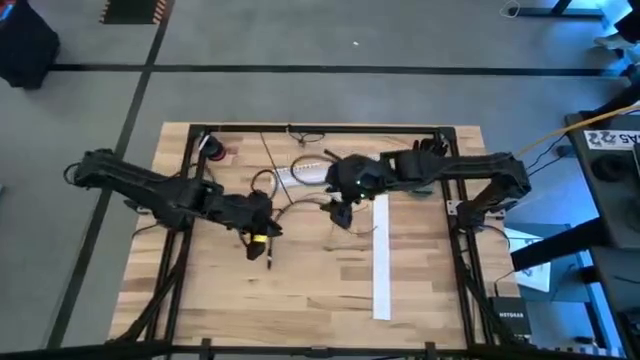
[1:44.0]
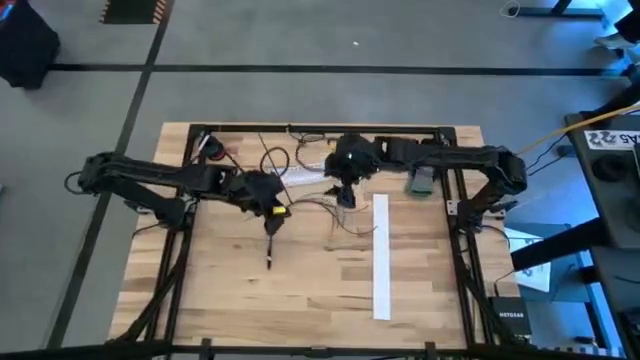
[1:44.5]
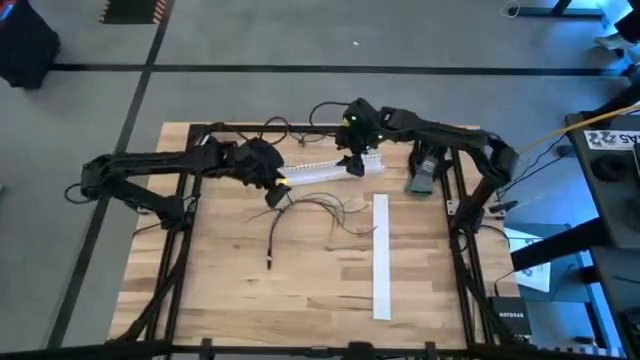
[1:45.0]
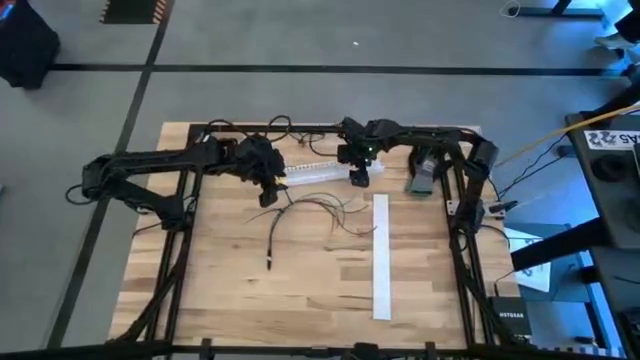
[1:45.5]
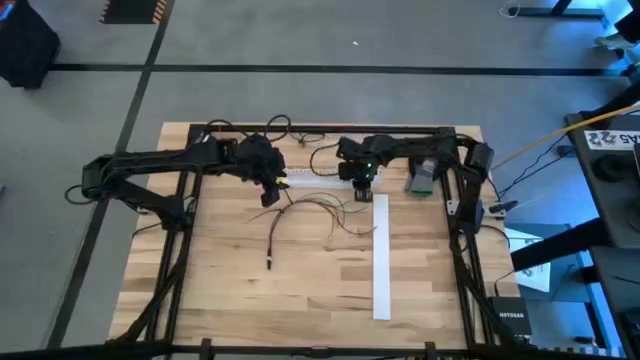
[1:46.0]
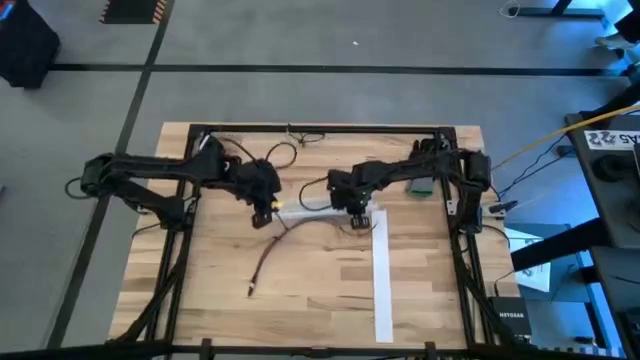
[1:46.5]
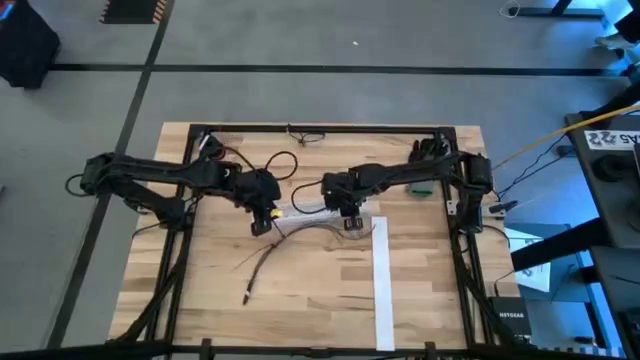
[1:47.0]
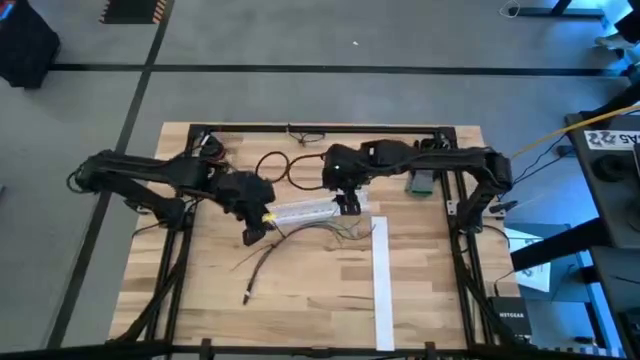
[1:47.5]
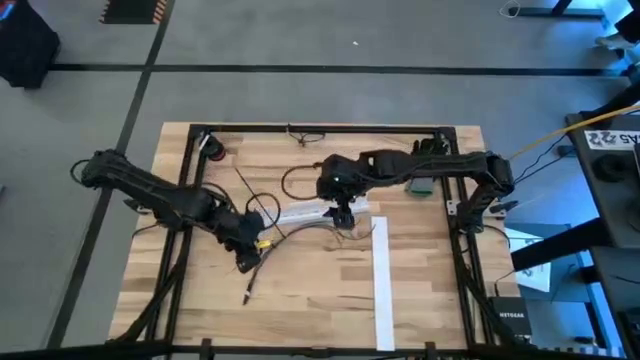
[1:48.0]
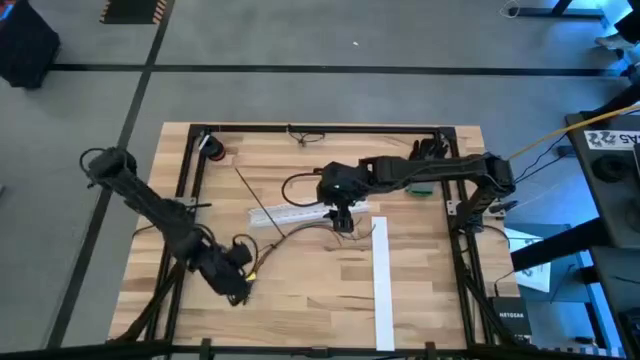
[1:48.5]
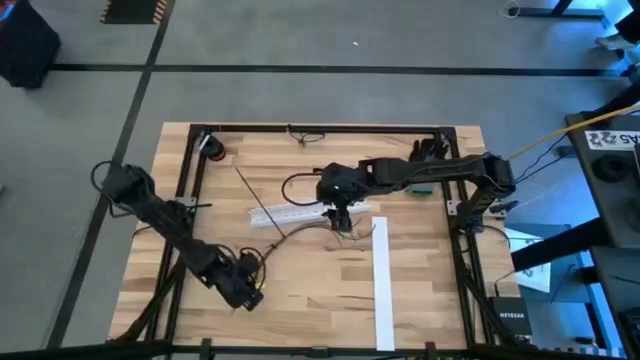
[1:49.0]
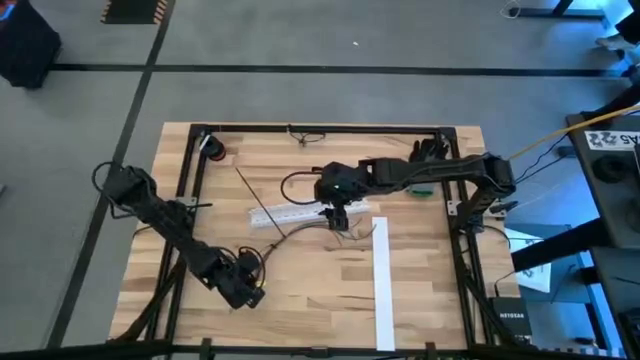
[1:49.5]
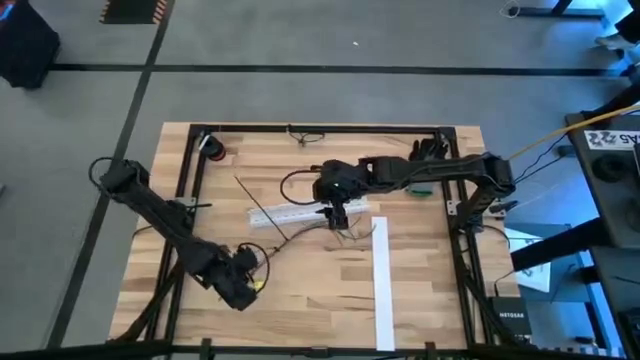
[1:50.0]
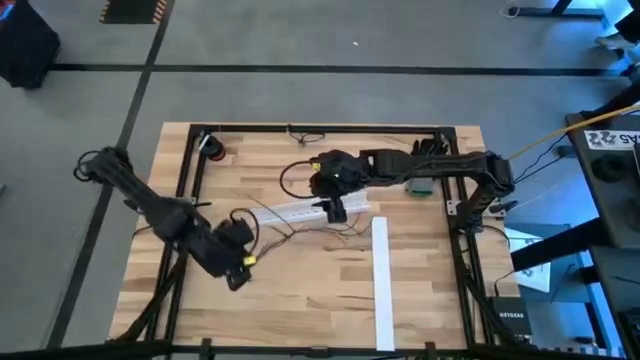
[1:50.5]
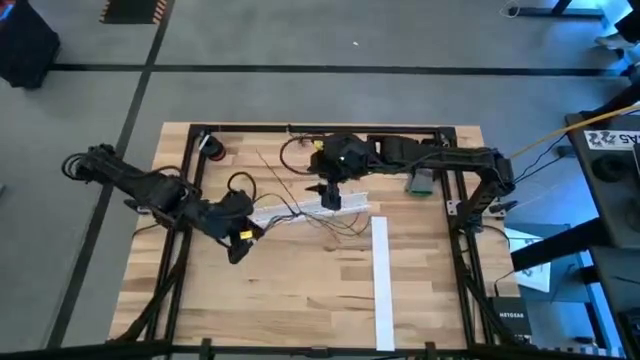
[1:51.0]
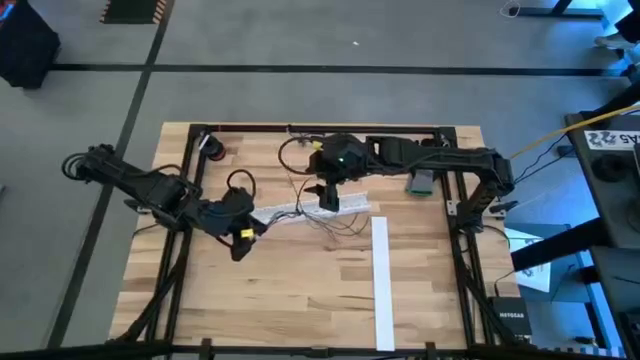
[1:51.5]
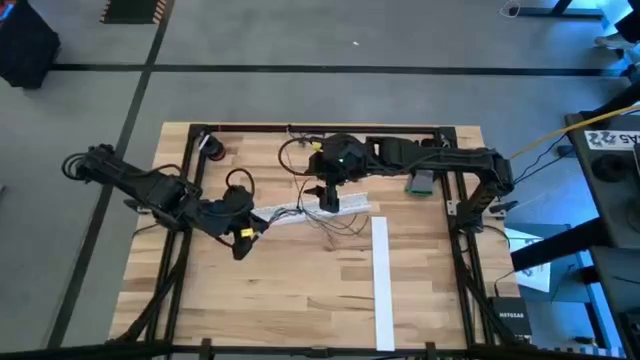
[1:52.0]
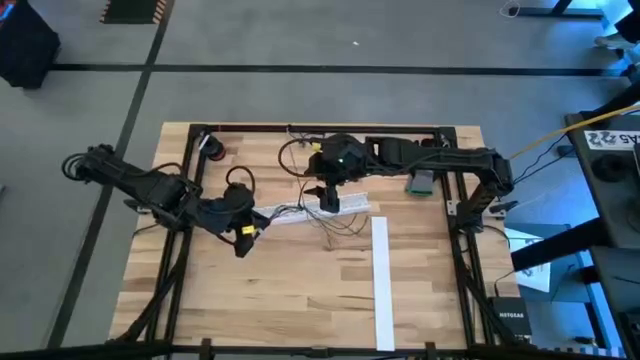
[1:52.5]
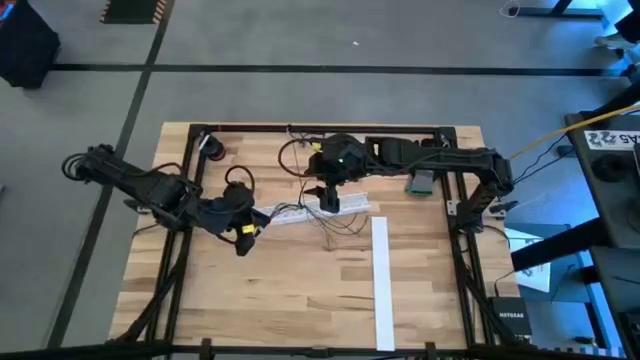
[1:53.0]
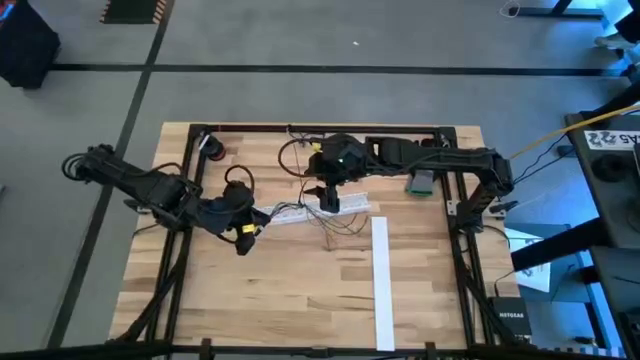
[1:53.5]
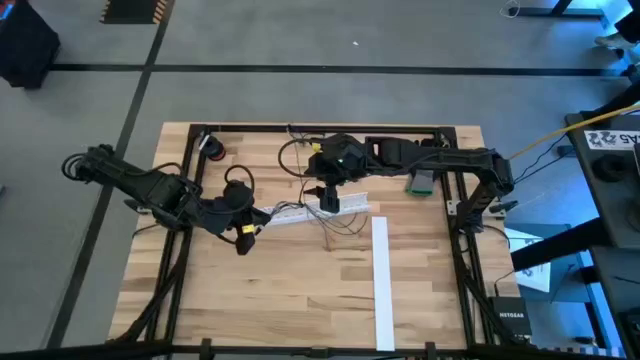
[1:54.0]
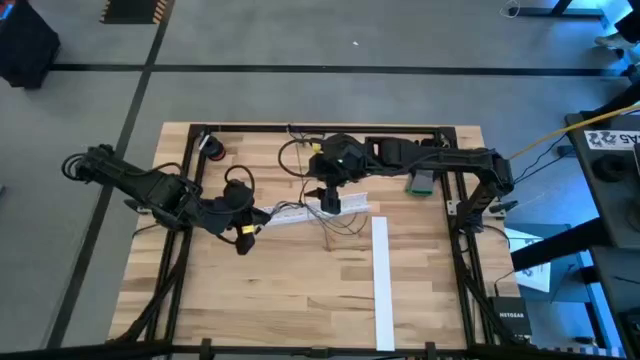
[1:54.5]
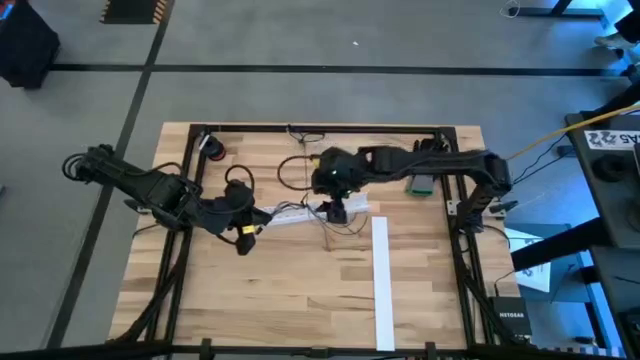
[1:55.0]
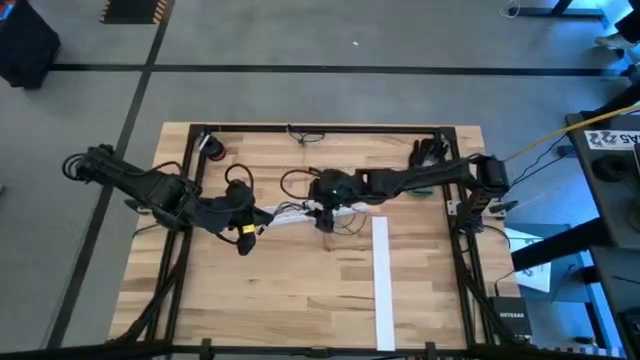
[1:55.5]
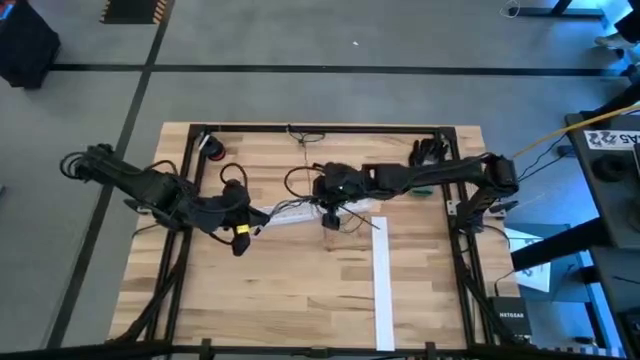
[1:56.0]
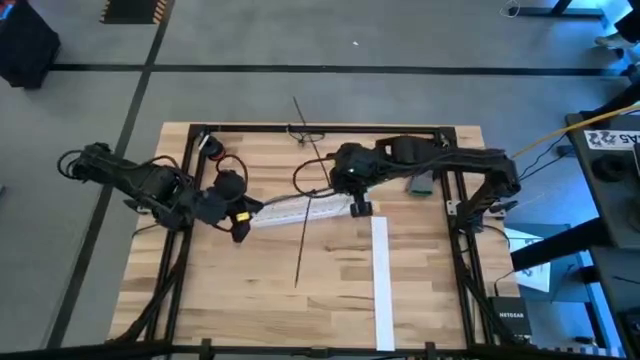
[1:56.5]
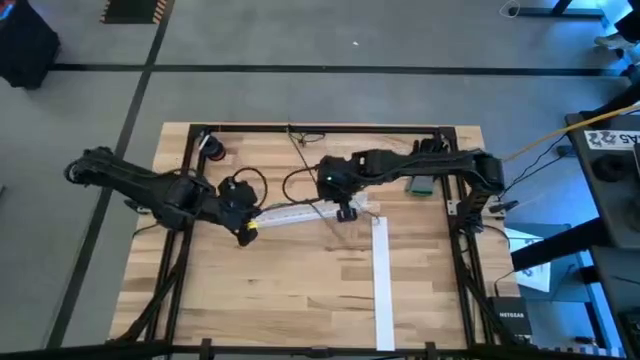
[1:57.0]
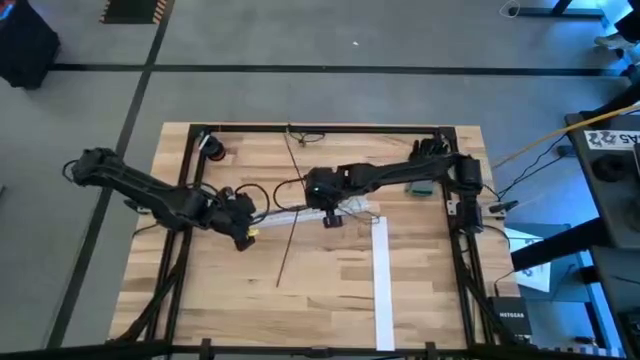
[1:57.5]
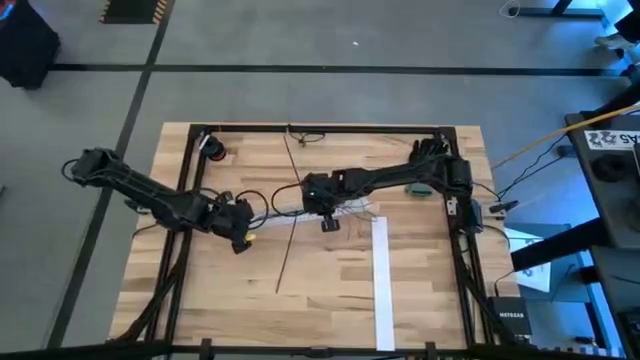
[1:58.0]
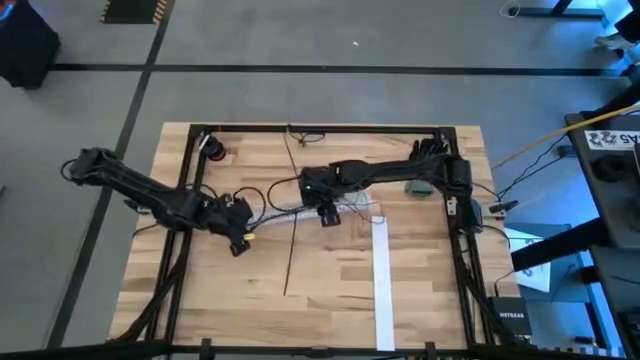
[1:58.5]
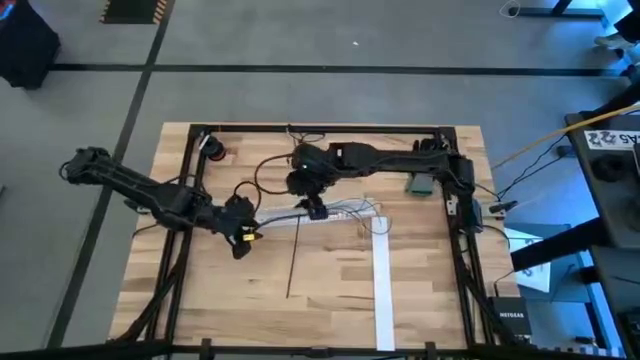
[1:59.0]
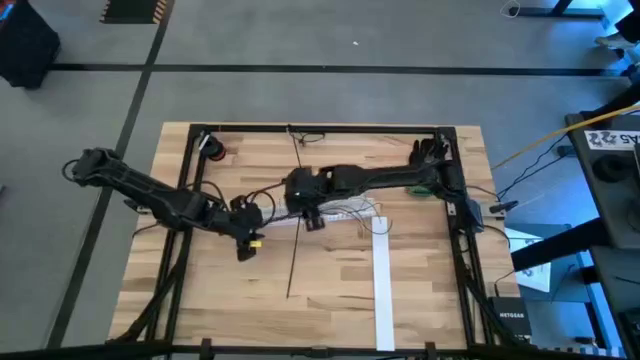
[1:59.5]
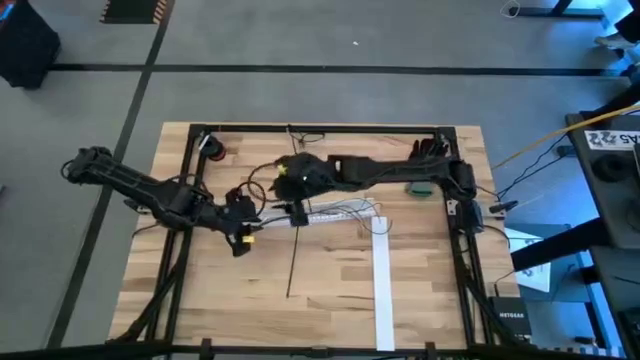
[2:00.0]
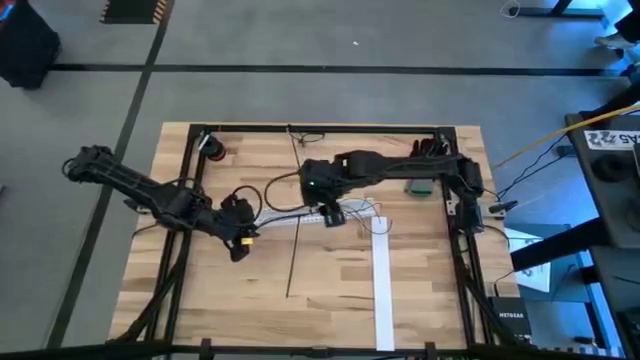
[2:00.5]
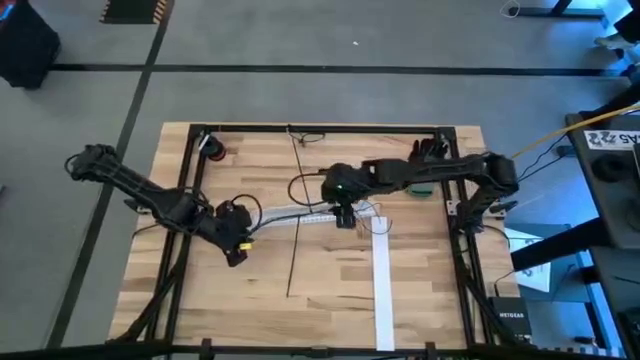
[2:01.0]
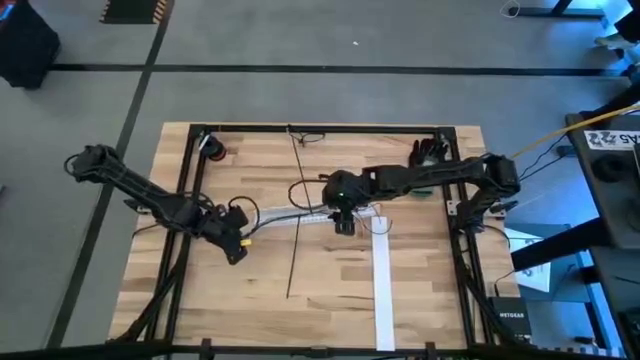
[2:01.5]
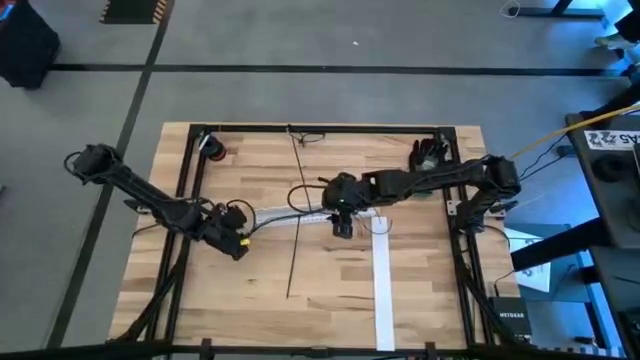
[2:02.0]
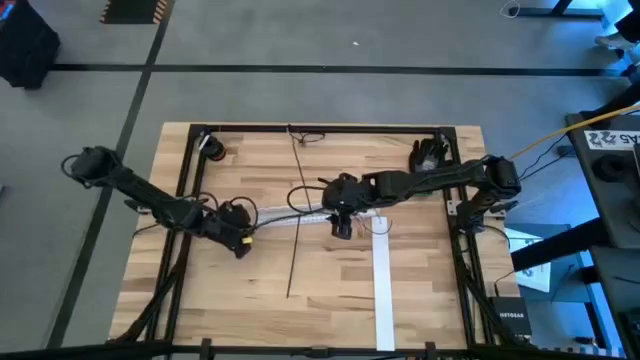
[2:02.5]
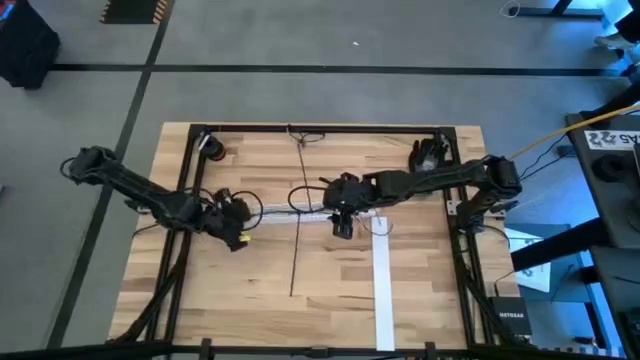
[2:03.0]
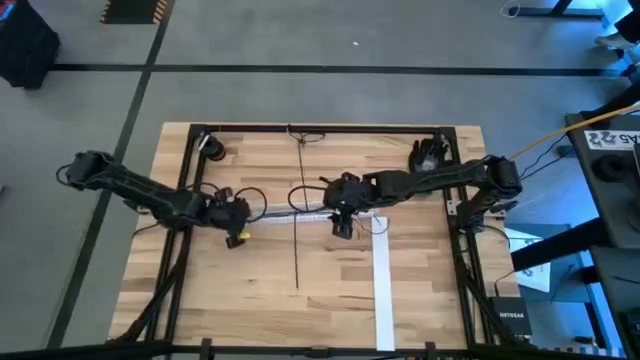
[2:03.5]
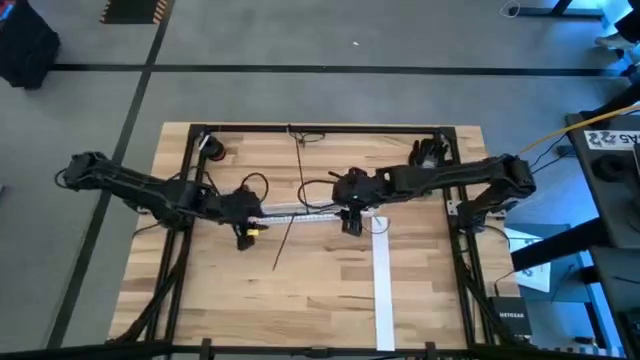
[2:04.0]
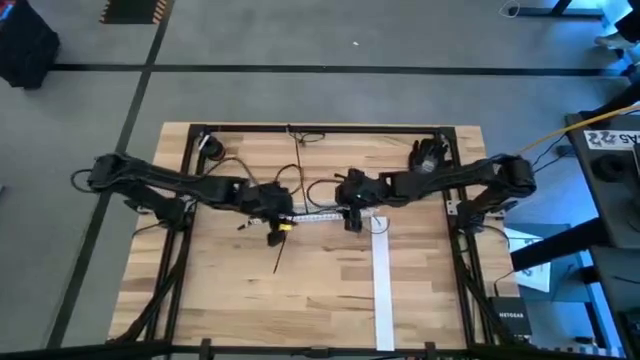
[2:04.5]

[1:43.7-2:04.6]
Task: Ziptie cables
Put the set of zip-tied cables in the cable duct
